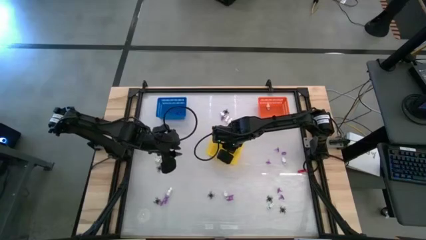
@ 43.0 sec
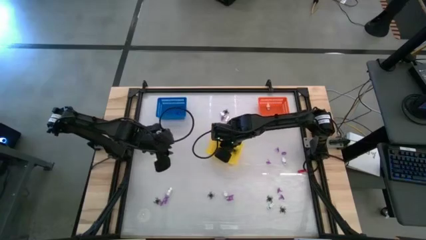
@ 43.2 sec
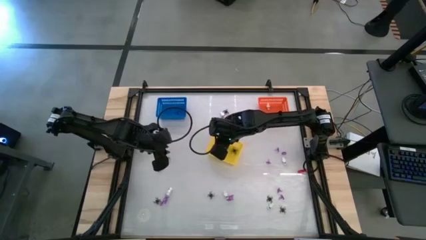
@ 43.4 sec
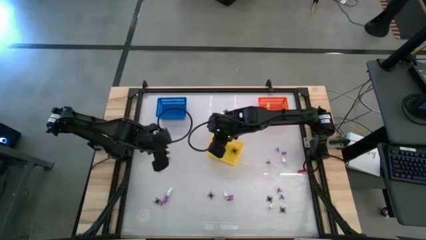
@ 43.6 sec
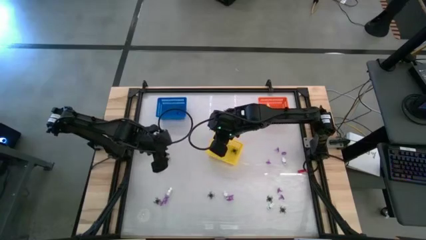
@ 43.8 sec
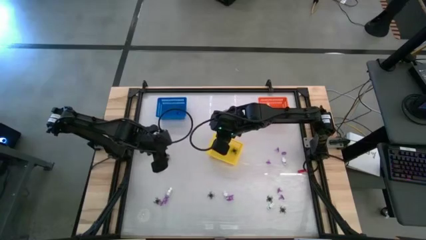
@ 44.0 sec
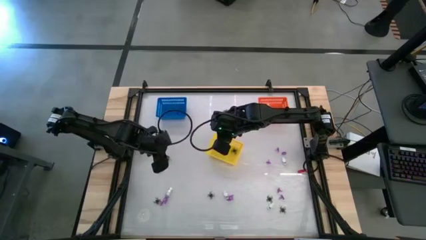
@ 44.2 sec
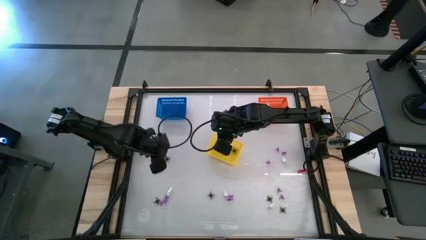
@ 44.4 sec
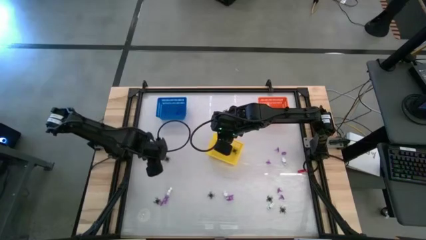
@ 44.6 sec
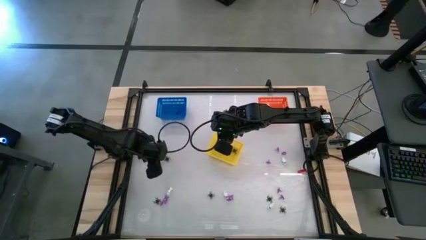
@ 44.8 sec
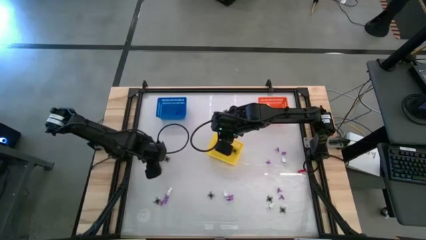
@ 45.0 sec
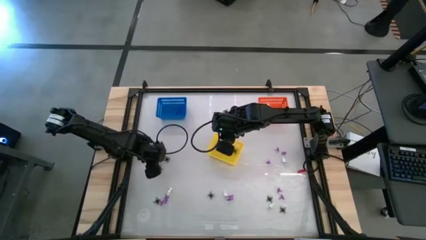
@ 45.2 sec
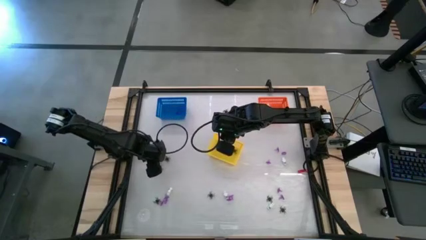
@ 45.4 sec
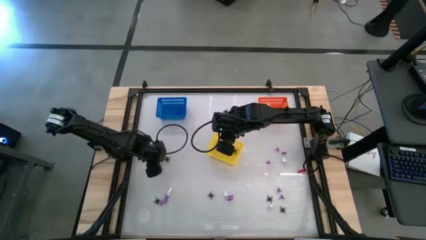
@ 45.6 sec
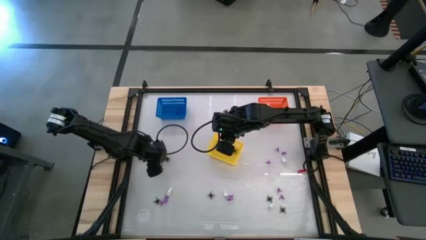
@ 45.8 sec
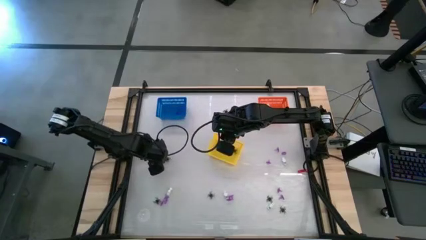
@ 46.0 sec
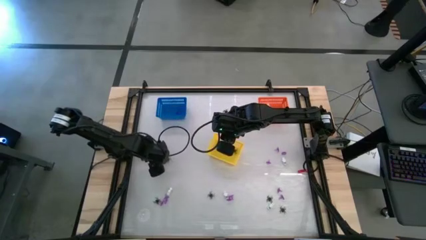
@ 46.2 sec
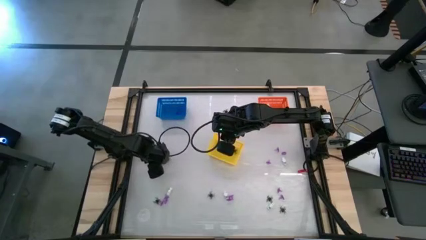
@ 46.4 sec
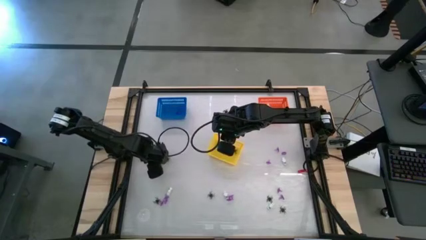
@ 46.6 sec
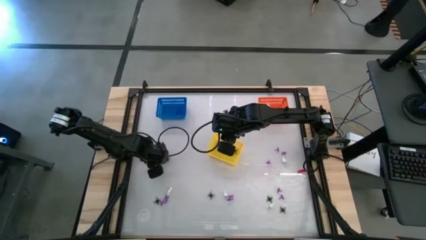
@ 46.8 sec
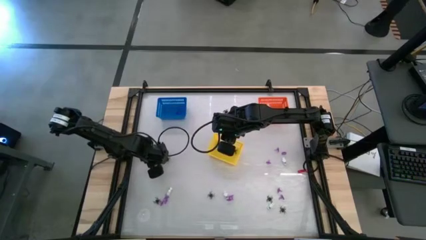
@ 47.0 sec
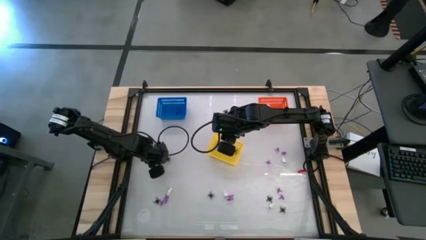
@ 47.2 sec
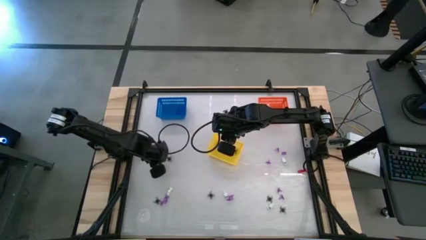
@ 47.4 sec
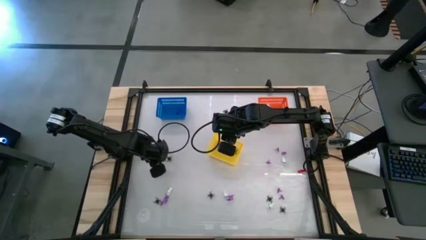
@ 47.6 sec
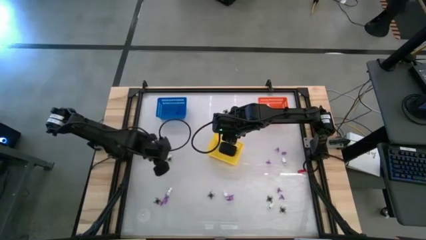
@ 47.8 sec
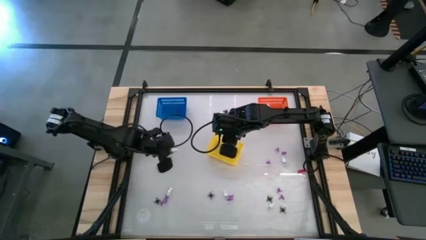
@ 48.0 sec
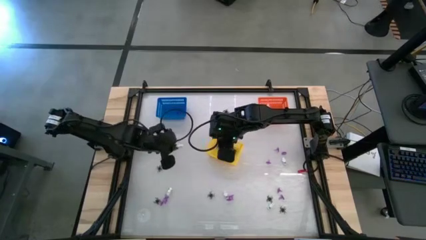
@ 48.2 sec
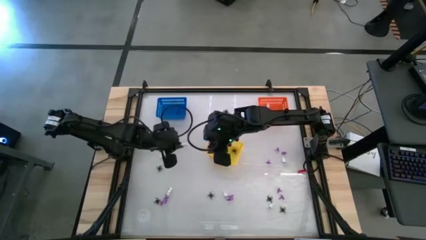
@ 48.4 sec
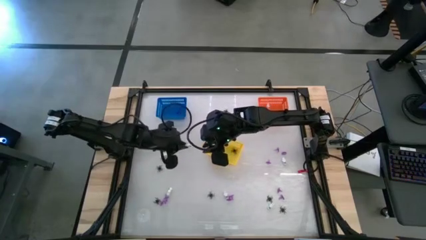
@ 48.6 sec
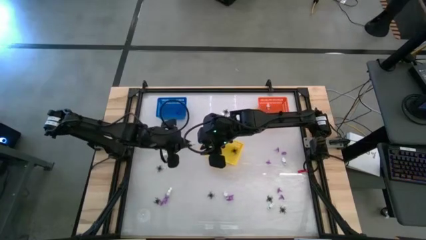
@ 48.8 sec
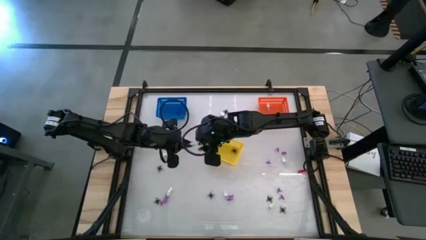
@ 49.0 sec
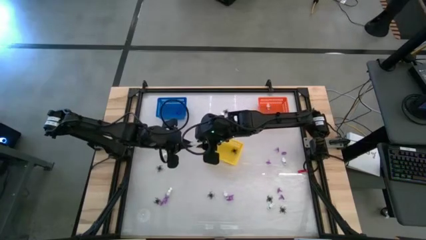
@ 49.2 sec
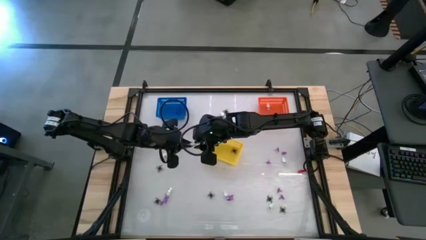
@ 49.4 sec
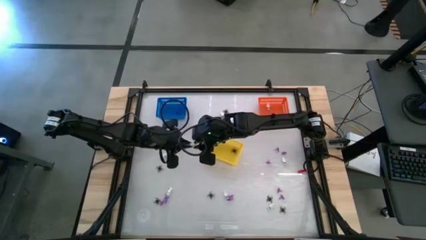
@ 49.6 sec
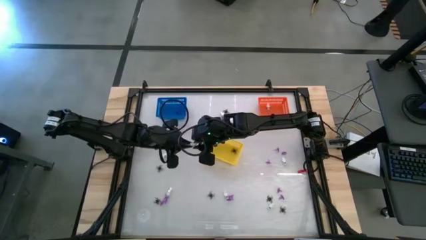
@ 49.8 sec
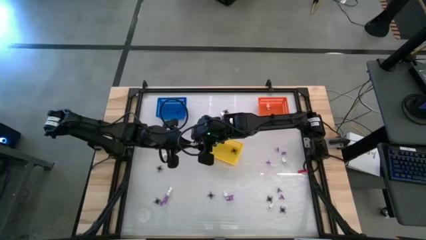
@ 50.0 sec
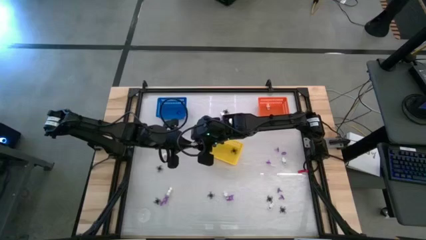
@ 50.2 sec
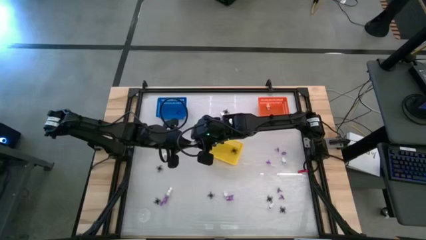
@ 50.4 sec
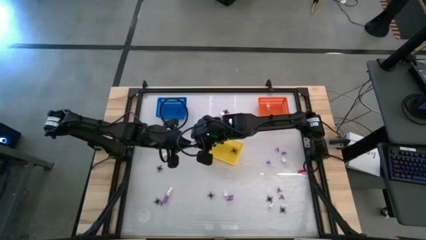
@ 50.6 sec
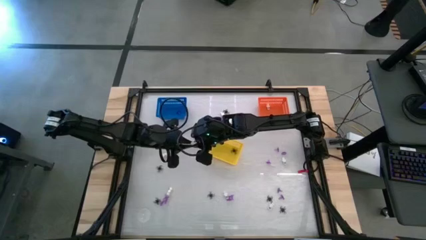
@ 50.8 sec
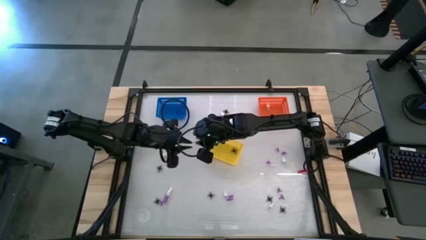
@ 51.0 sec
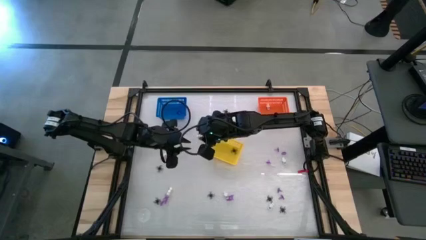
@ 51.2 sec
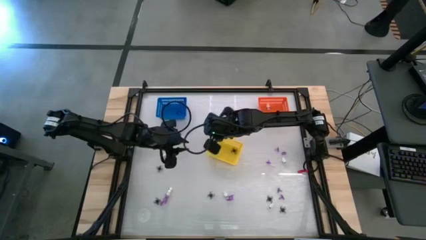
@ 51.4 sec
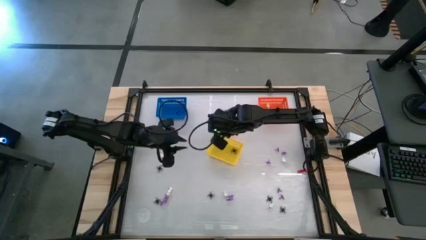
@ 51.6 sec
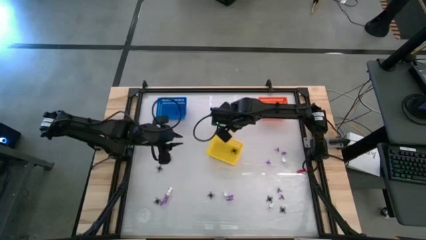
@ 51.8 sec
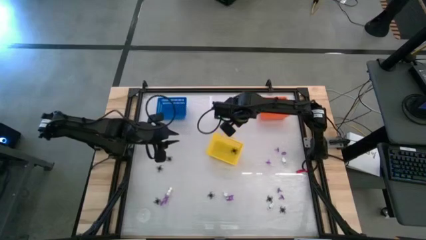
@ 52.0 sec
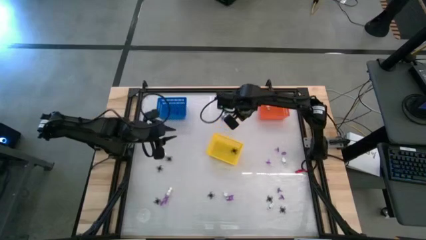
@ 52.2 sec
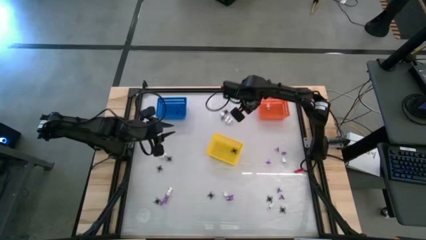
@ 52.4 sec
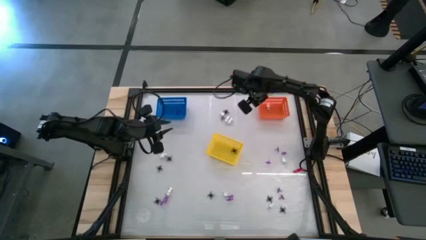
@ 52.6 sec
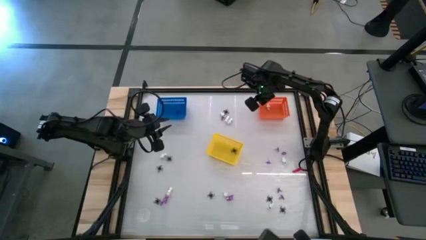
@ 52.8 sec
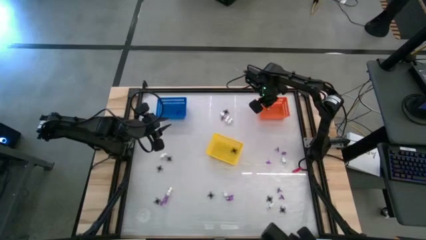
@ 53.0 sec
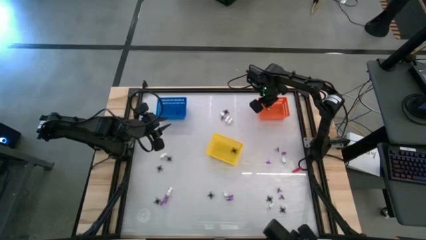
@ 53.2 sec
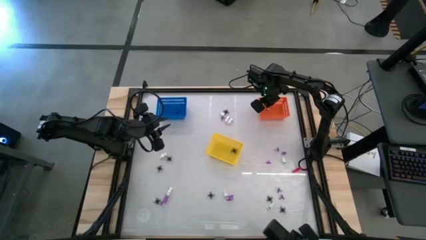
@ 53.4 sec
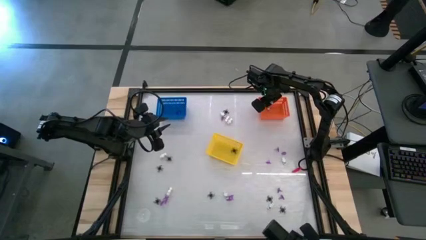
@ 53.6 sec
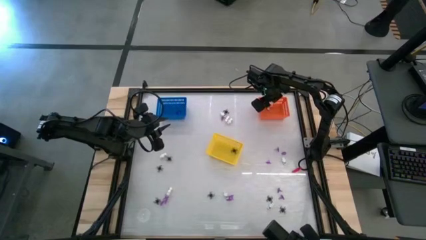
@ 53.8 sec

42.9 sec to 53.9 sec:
Task: Sort Halloween decoration
Put the white skeleton toy into the orange bin
